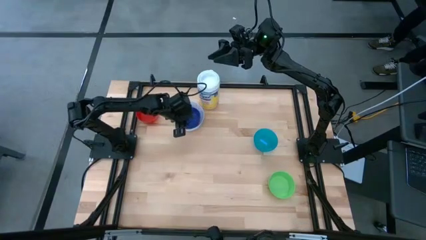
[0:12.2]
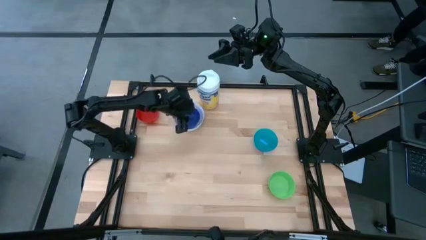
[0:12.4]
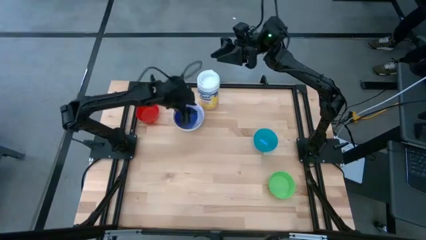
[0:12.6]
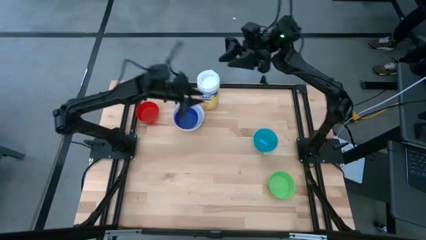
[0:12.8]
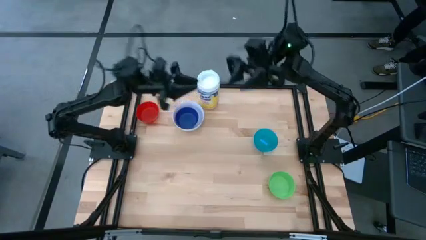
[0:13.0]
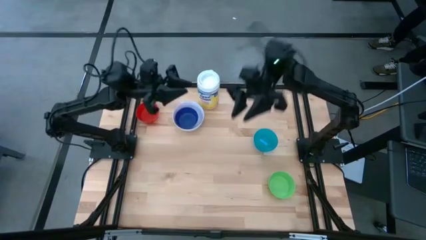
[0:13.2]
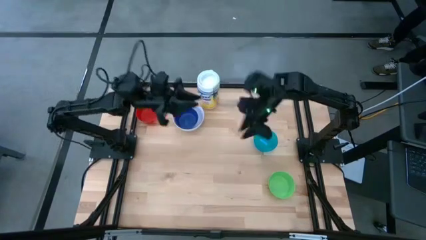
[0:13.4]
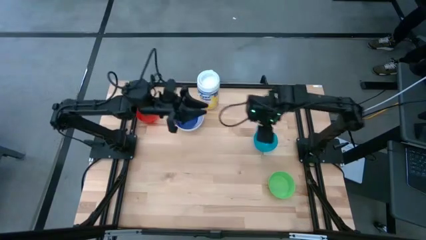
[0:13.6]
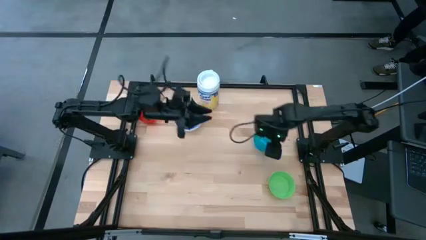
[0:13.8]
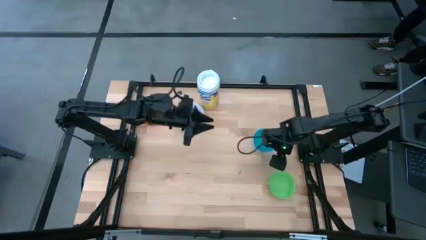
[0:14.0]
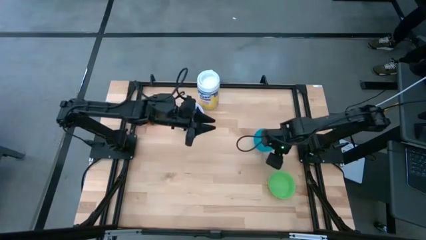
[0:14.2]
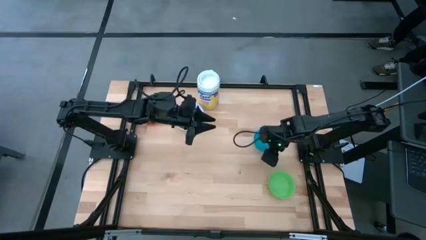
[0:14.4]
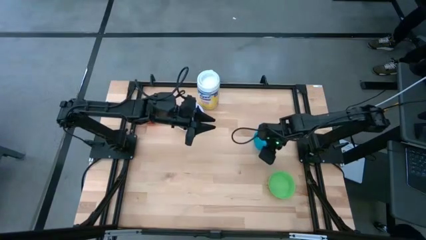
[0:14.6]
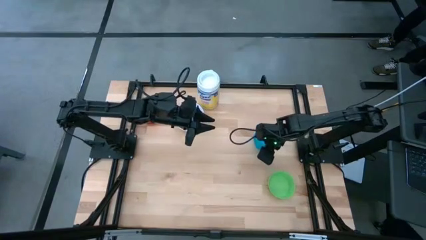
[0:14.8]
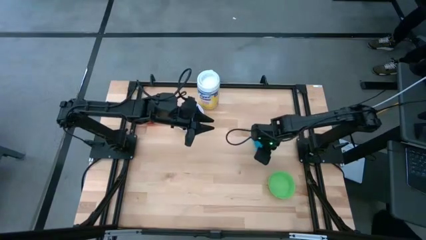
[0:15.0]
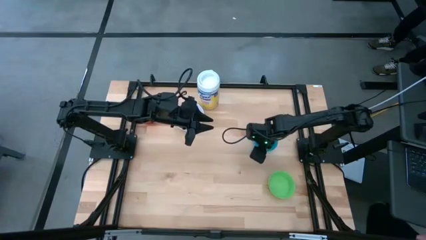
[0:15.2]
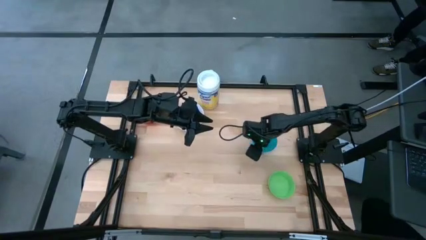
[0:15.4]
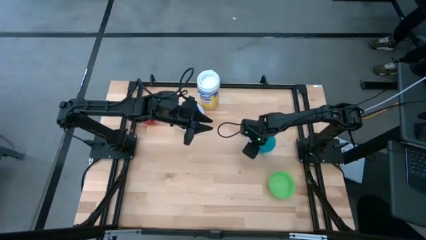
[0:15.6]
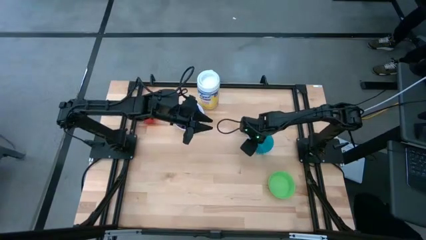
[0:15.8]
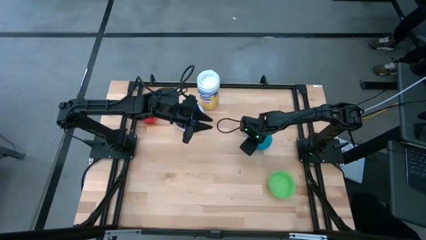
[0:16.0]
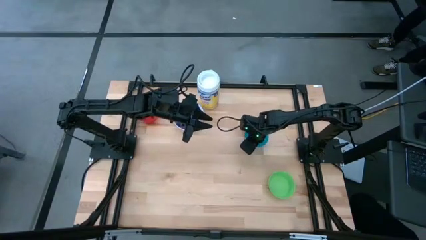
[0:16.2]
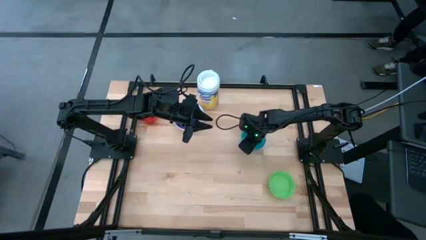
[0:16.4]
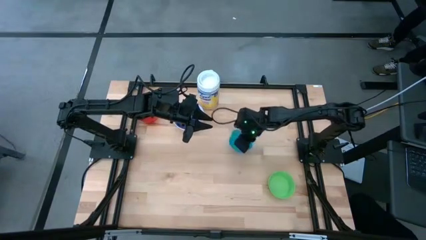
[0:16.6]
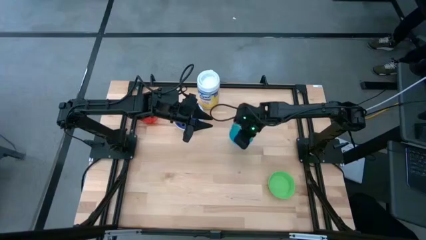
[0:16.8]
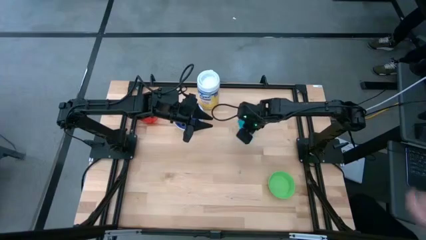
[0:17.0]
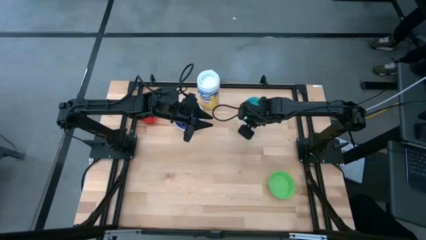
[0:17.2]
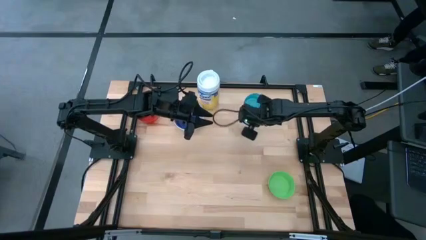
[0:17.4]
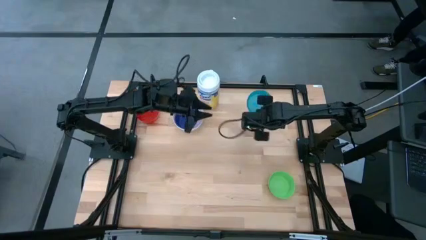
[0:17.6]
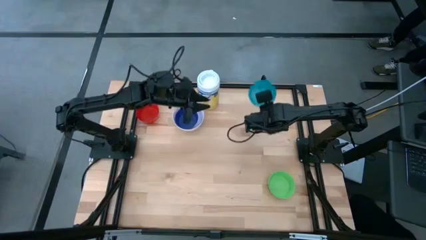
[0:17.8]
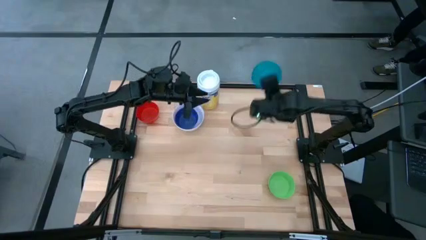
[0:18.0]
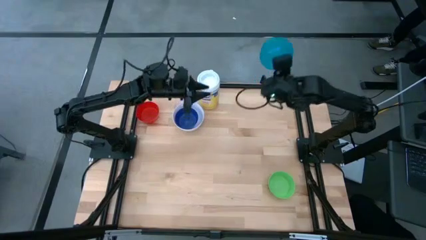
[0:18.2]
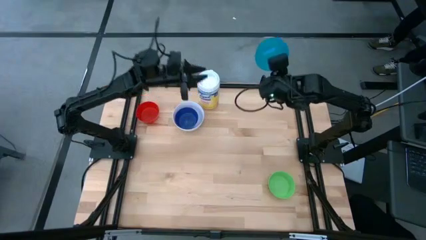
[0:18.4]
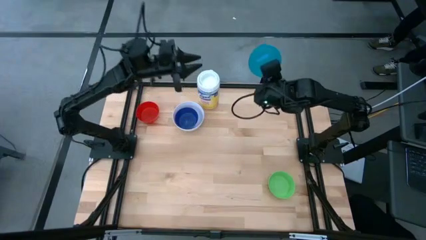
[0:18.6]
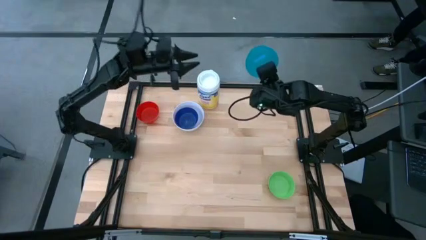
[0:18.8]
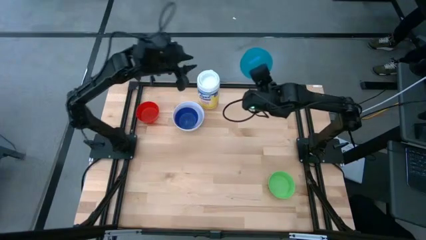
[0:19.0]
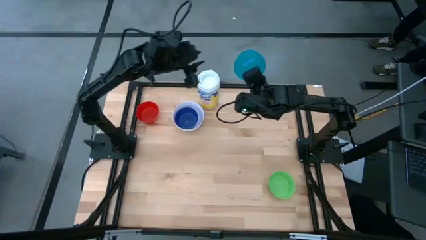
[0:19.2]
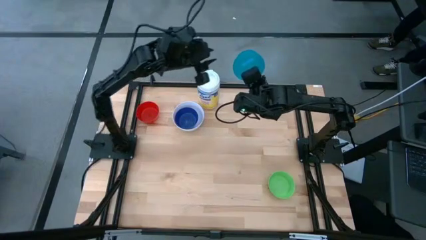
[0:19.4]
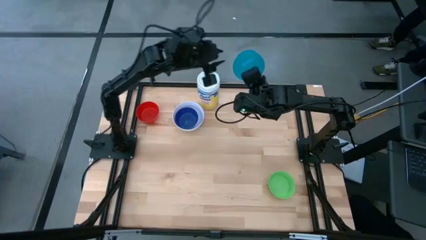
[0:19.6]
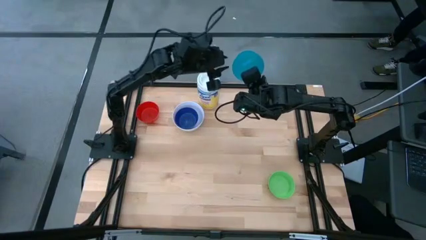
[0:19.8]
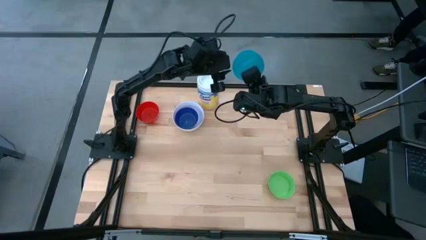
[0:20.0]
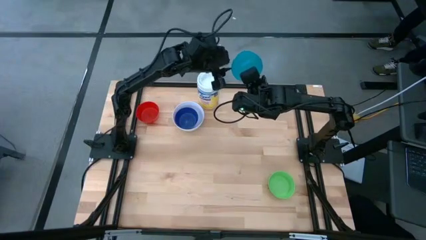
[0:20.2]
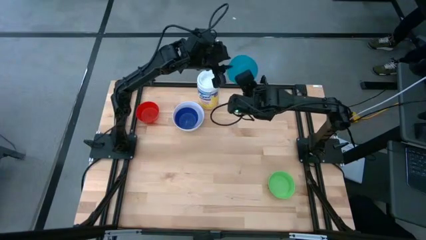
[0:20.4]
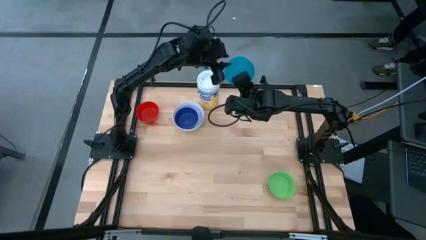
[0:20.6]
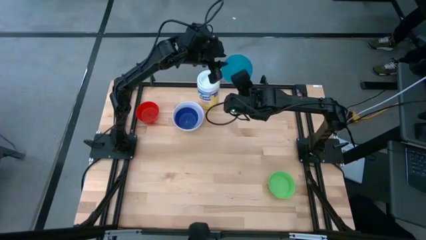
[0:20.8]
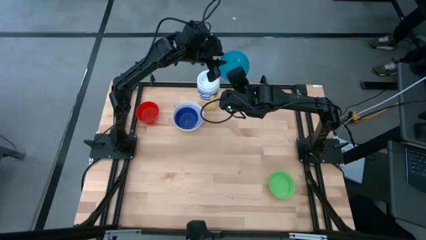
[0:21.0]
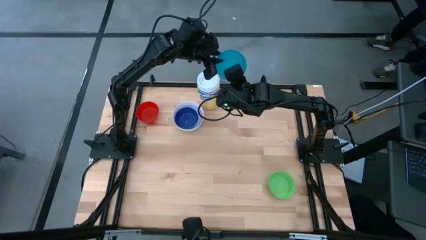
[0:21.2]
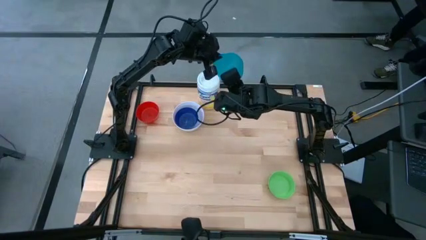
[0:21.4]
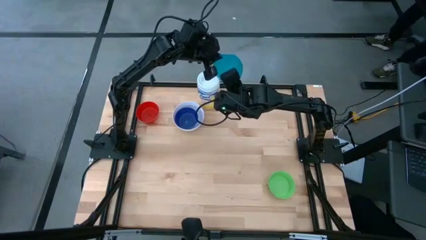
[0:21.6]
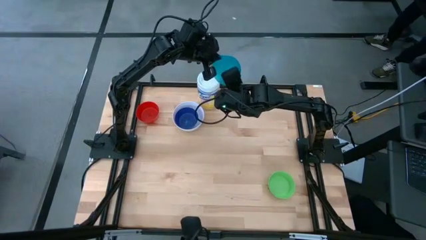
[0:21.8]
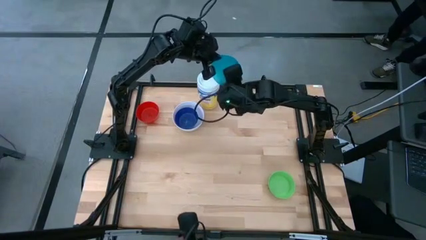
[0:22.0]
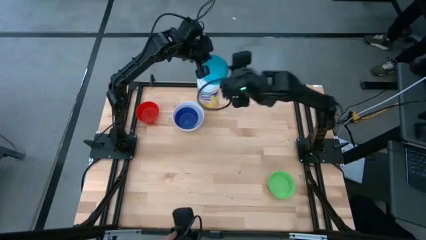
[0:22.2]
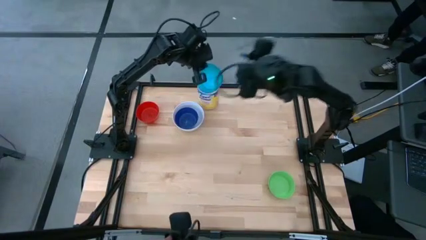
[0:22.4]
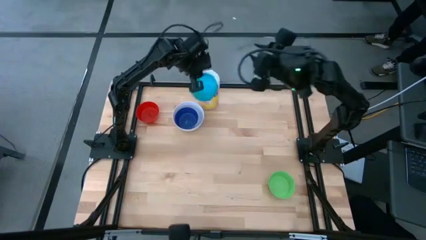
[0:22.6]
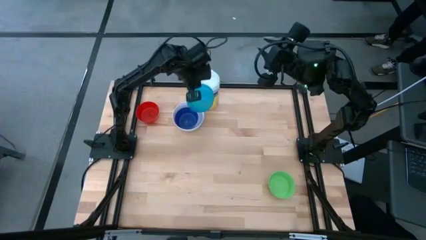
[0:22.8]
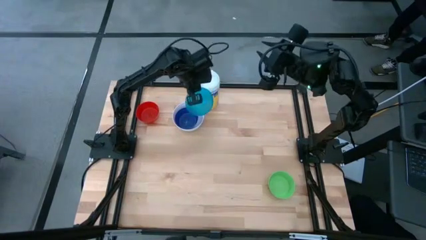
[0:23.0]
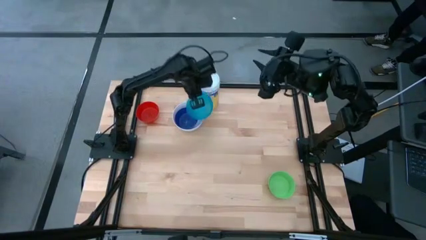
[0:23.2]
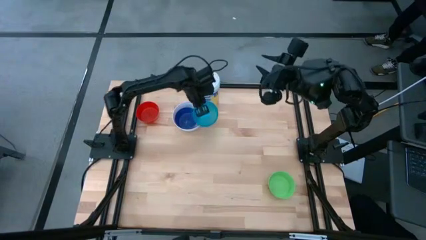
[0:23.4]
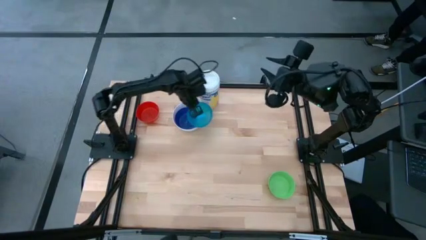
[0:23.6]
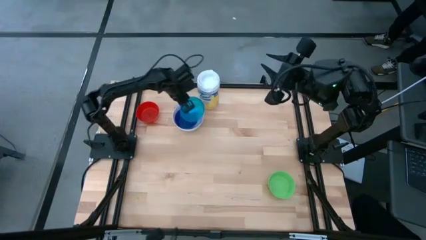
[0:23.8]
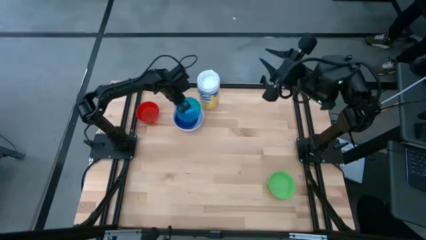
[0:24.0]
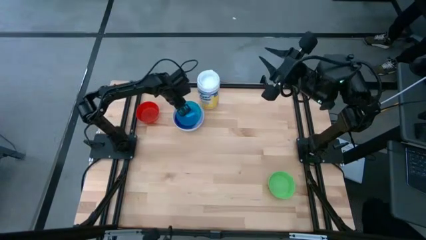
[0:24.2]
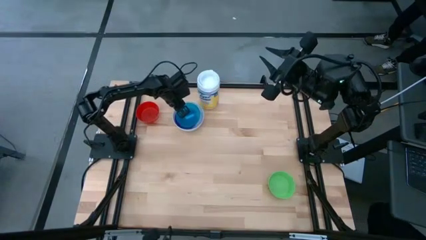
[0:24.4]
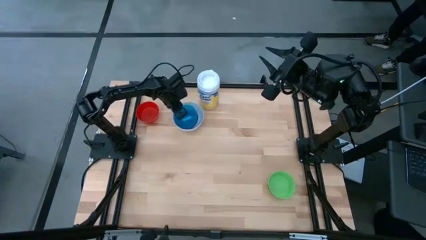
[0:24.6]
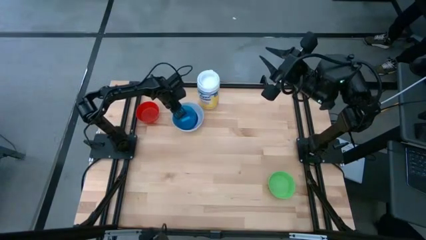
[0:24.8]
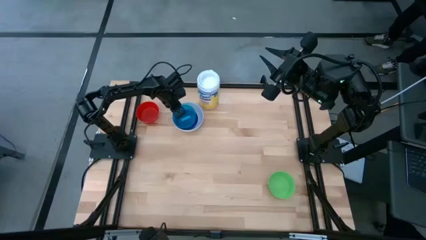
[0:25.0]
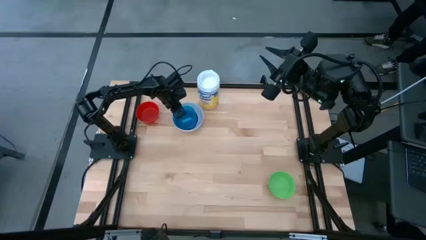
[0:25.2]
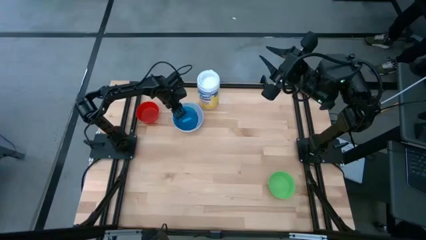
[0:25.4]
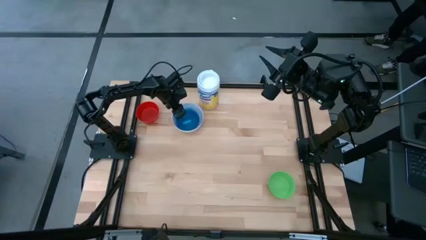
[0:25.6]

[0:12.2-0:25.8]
Stack the light blue bowl on top of the blue bowl

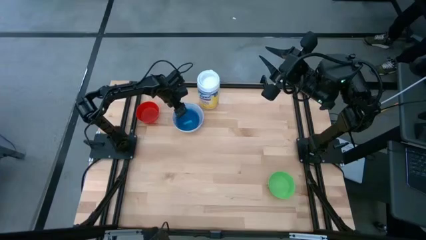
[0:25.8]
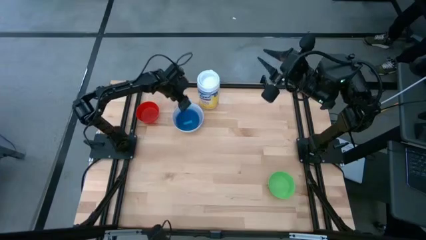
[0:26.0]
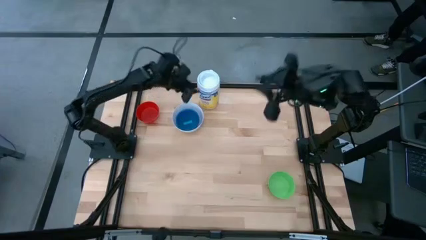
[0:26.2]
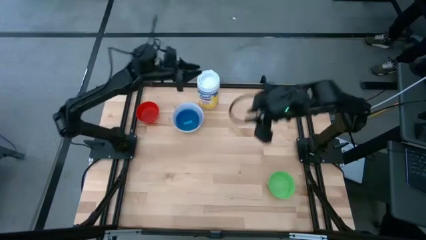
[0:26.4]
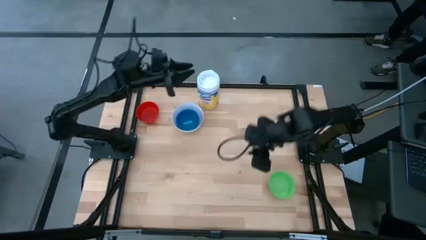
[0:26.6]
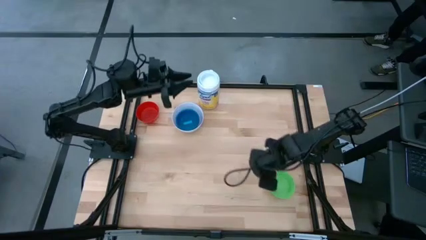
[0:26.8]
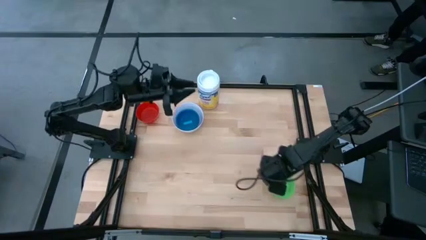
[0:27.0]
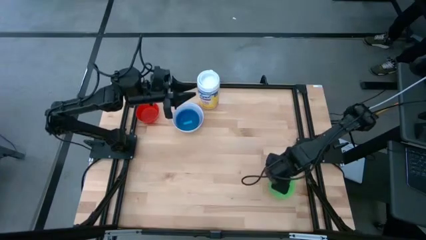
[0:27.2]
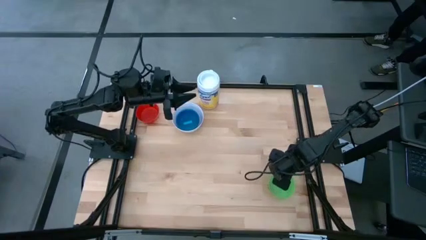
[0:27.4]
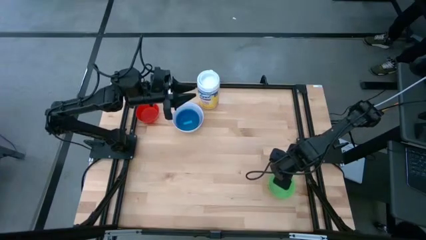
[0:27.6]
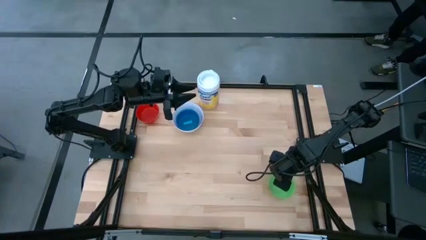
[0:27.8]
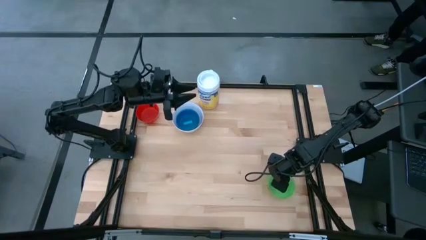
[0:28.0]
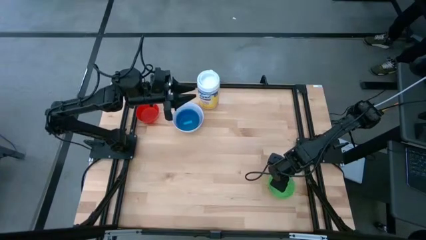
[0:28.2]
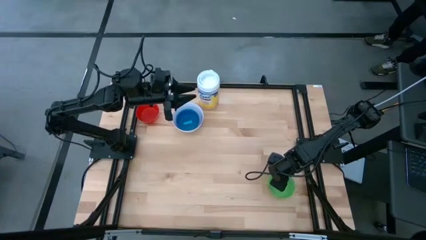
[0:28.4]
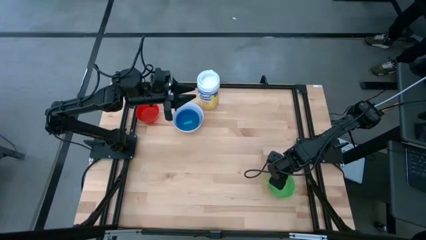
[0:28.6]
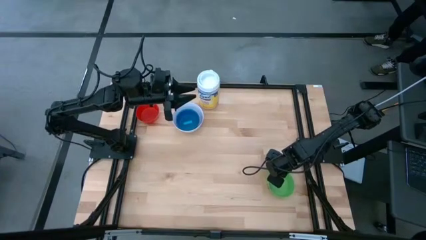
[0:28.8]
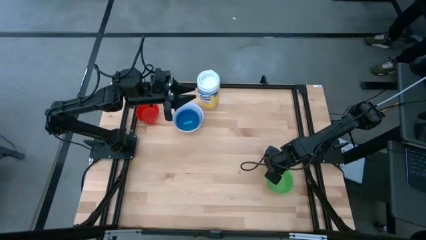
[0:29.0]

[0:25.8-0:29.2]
Stack the green bowl on top of the light blue bowl
